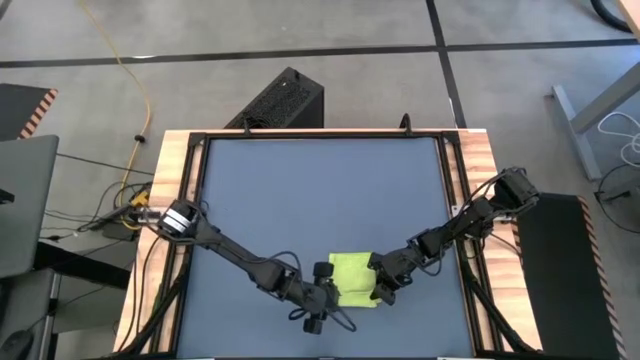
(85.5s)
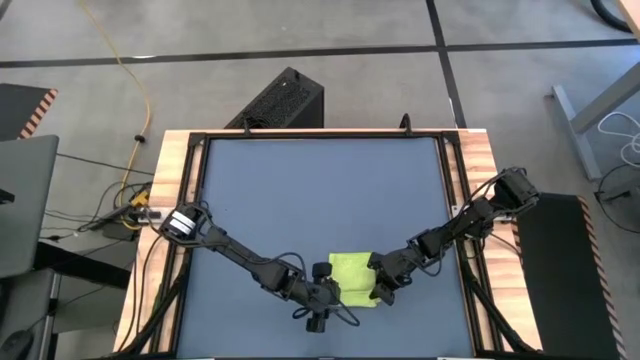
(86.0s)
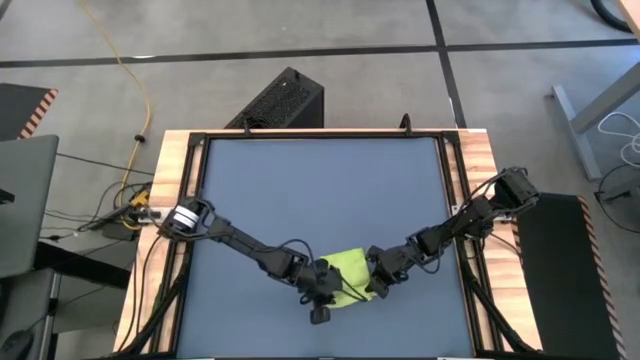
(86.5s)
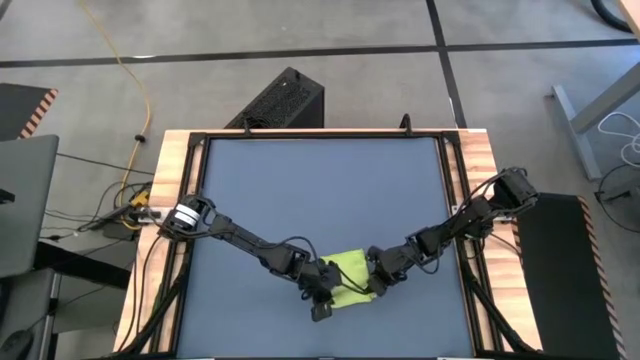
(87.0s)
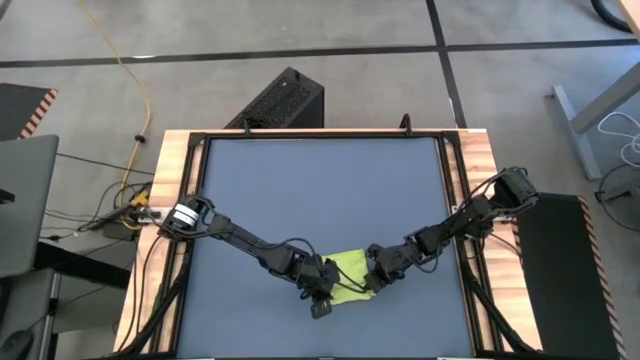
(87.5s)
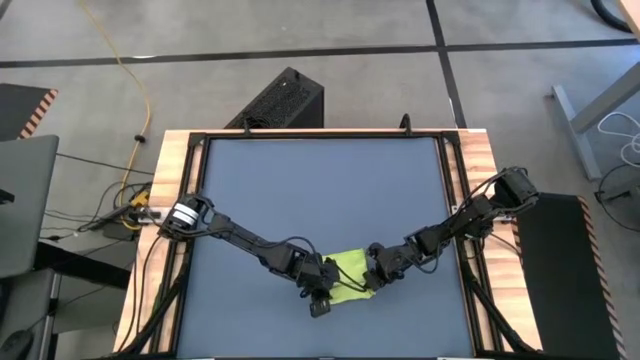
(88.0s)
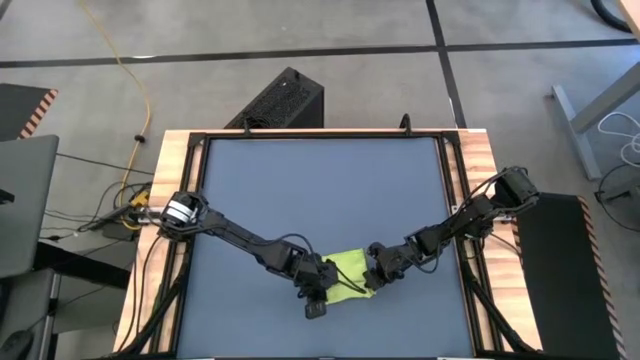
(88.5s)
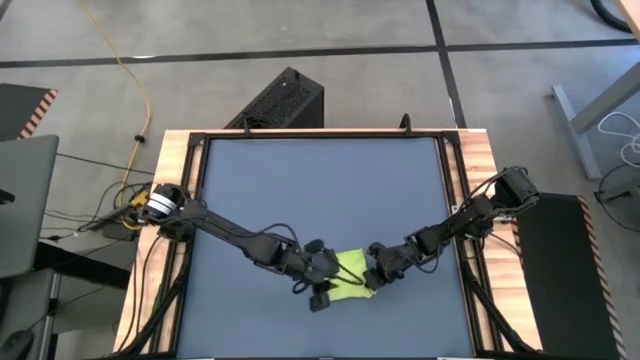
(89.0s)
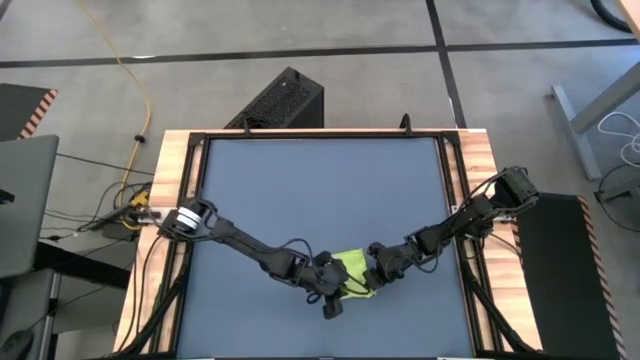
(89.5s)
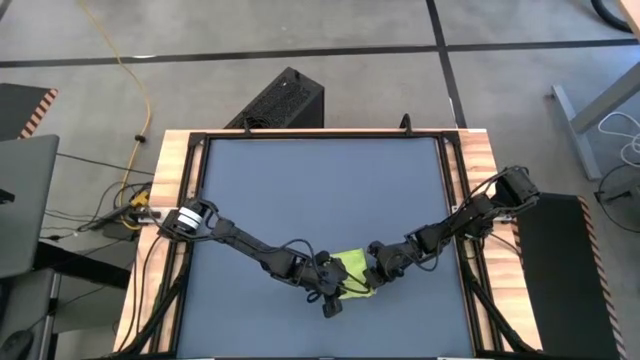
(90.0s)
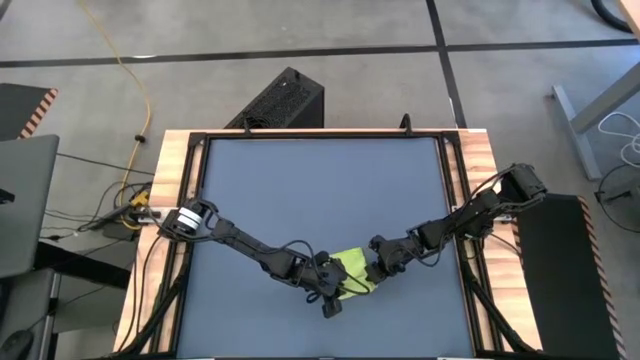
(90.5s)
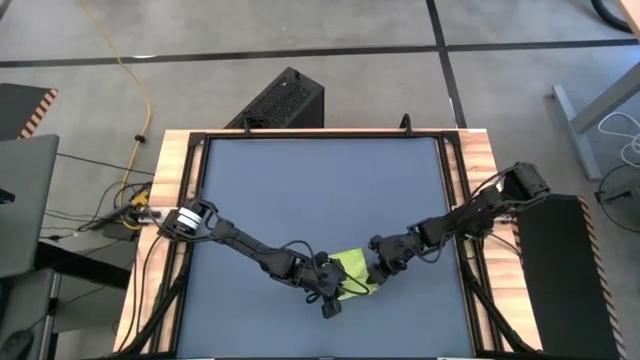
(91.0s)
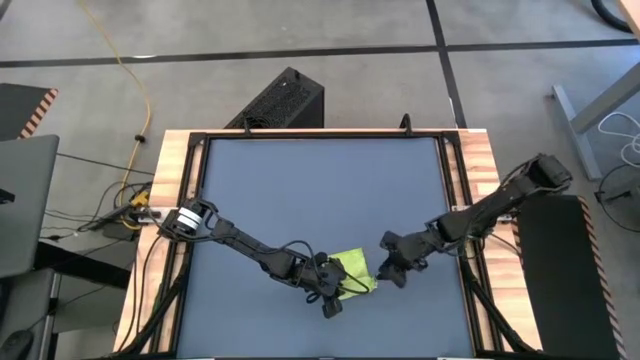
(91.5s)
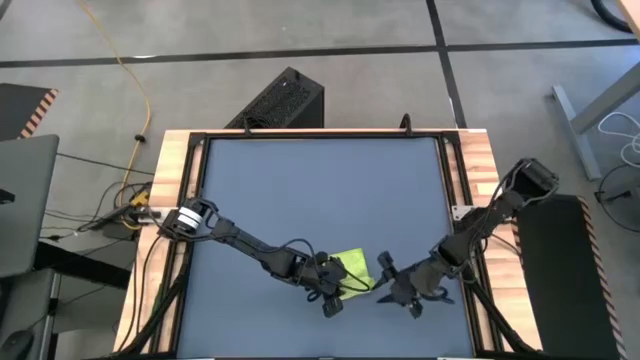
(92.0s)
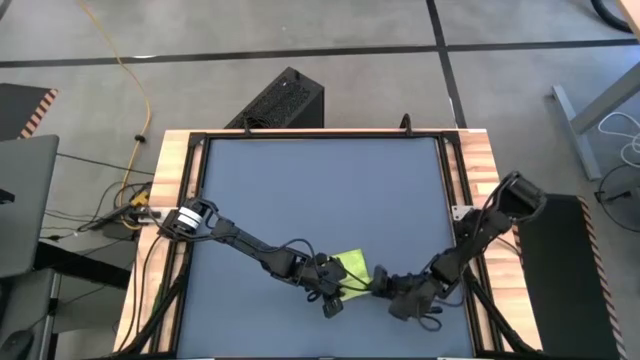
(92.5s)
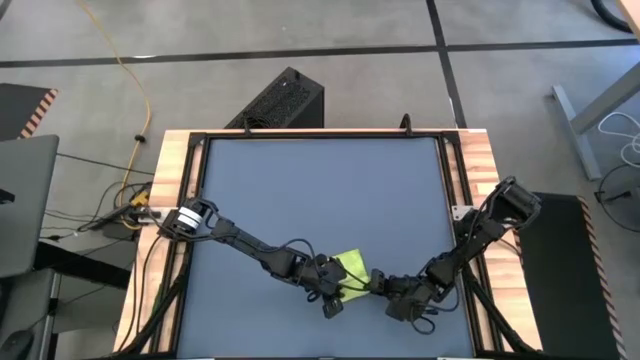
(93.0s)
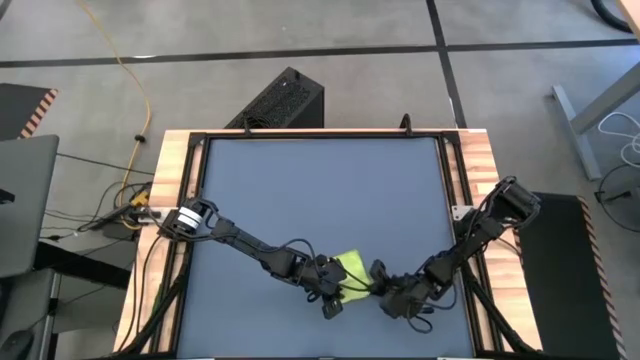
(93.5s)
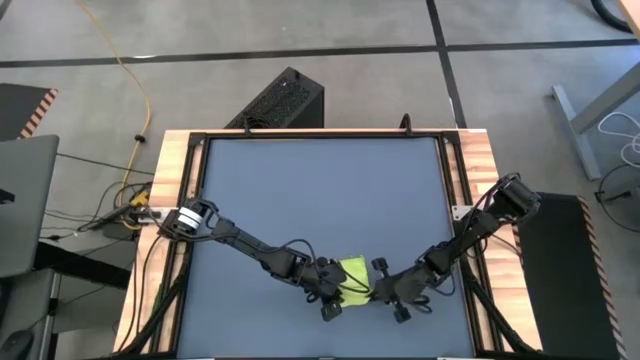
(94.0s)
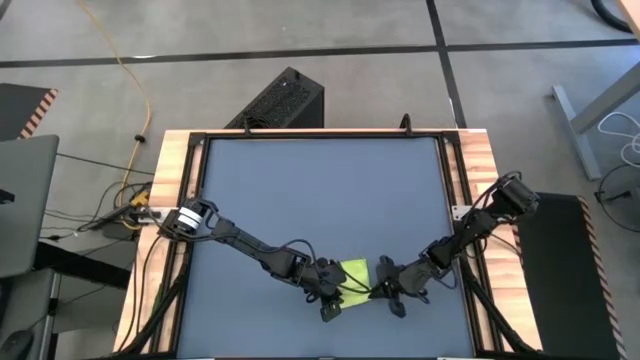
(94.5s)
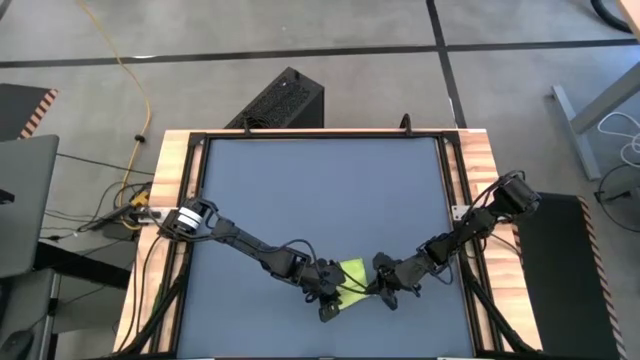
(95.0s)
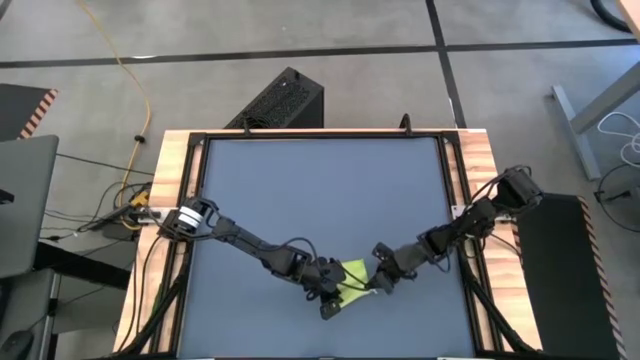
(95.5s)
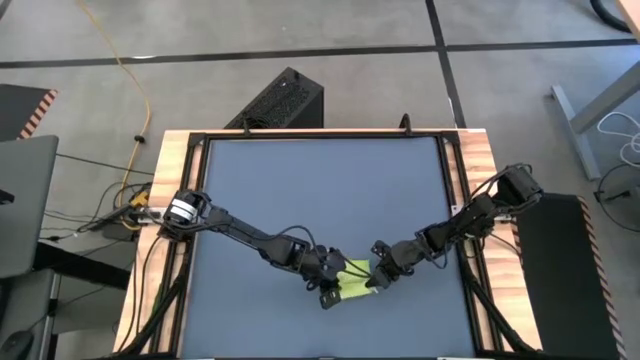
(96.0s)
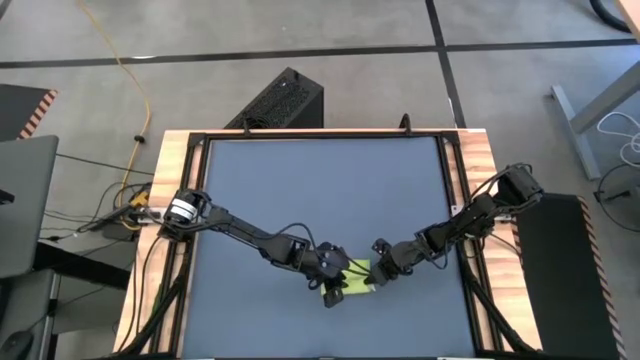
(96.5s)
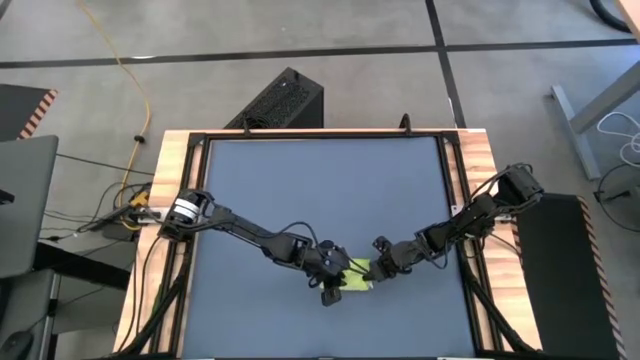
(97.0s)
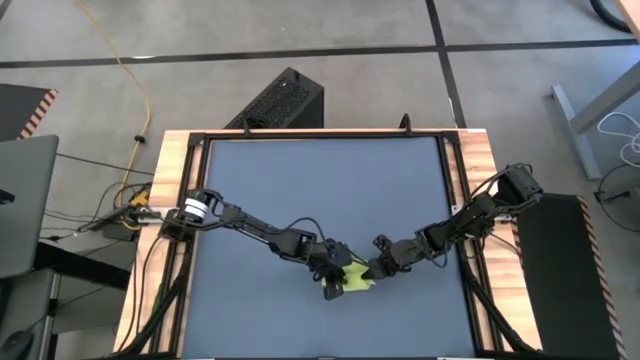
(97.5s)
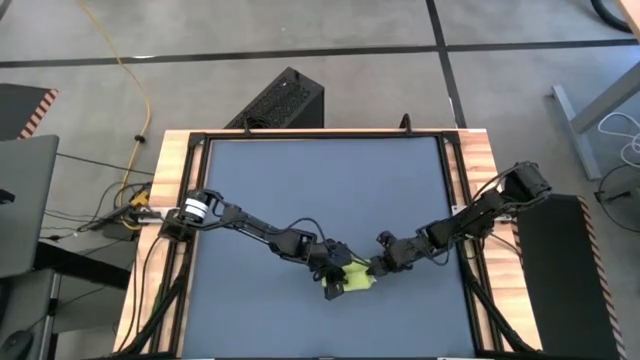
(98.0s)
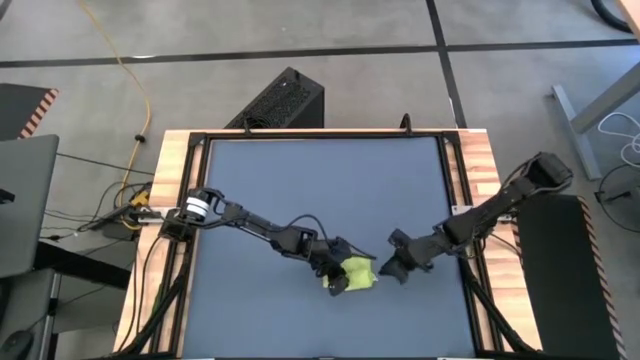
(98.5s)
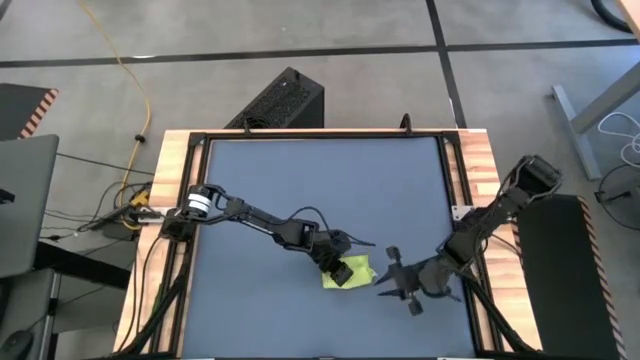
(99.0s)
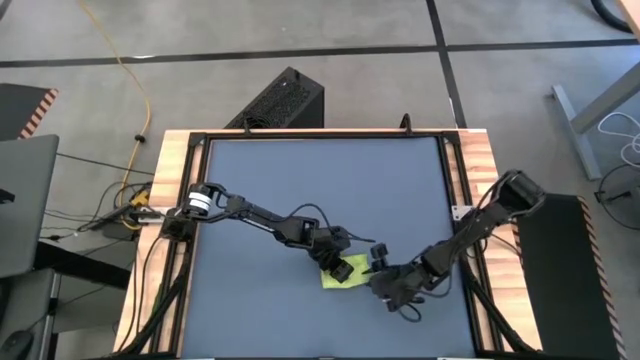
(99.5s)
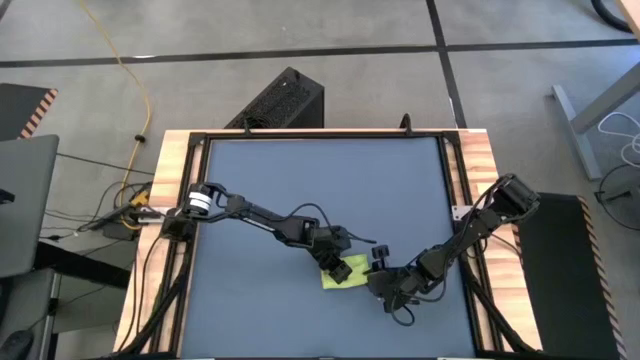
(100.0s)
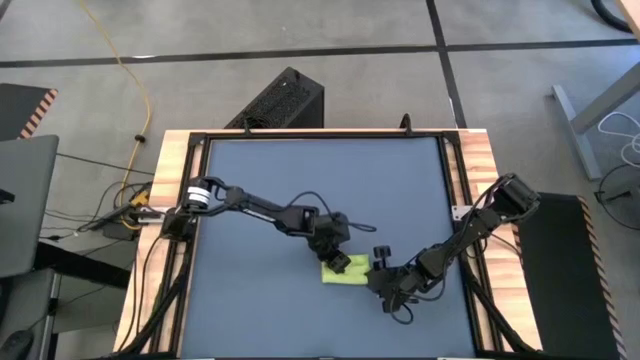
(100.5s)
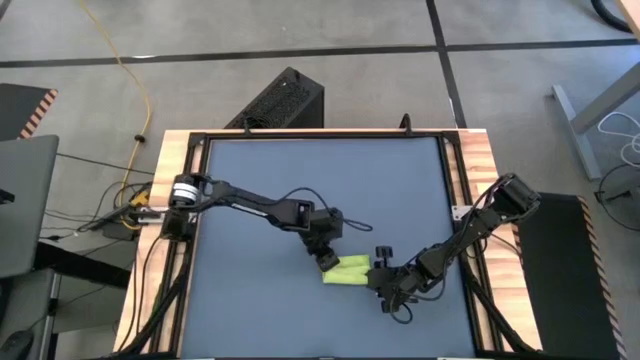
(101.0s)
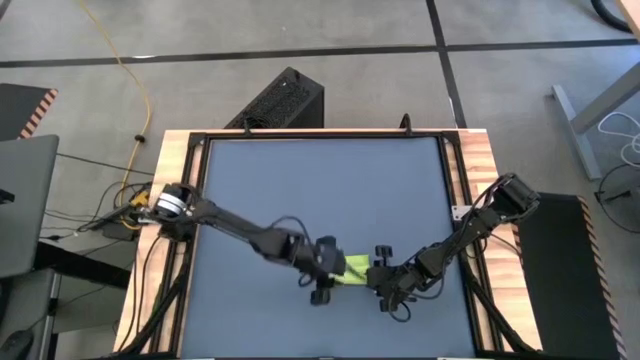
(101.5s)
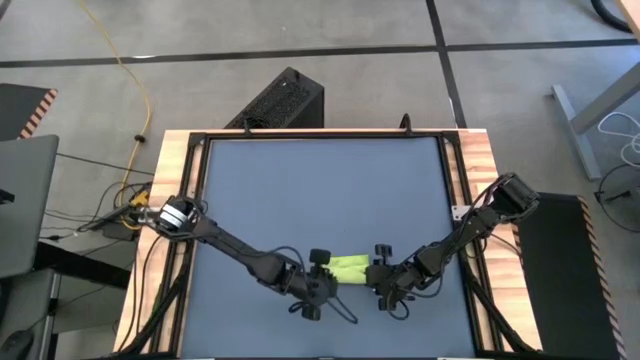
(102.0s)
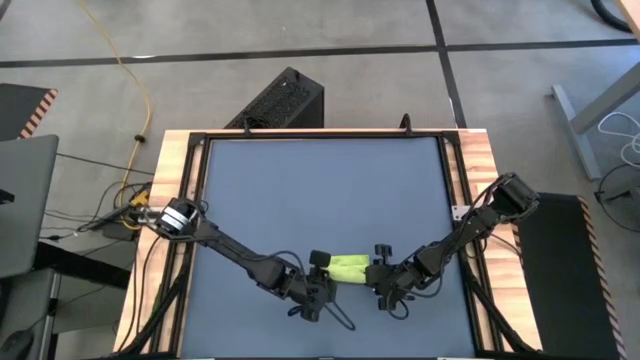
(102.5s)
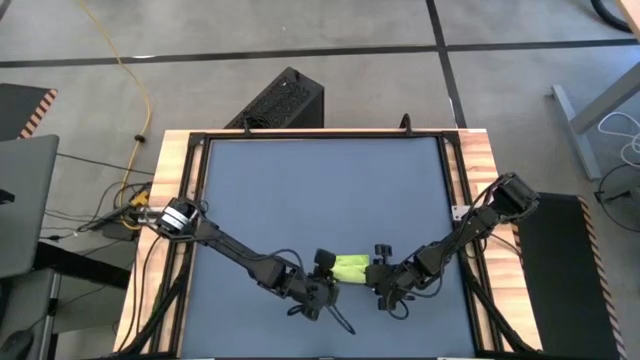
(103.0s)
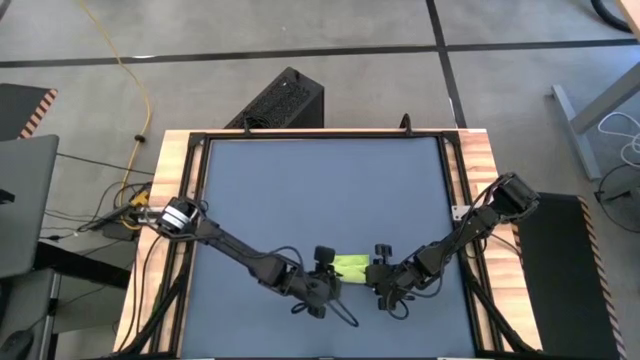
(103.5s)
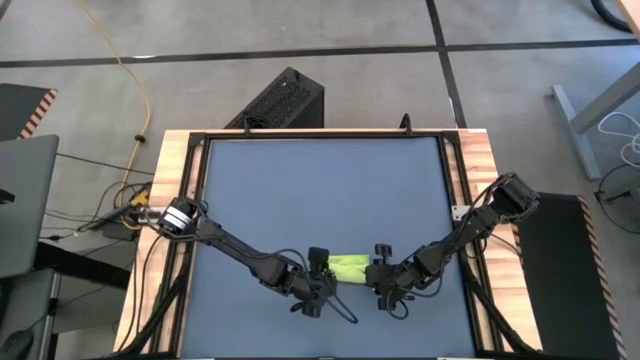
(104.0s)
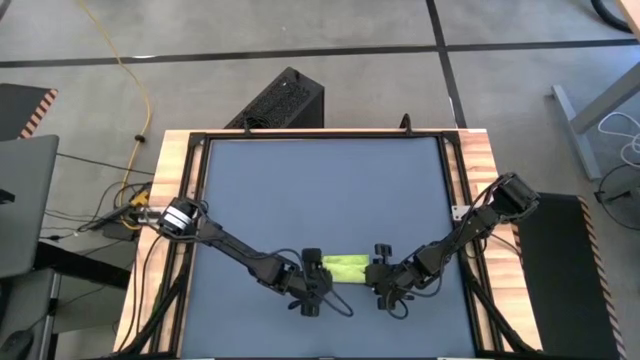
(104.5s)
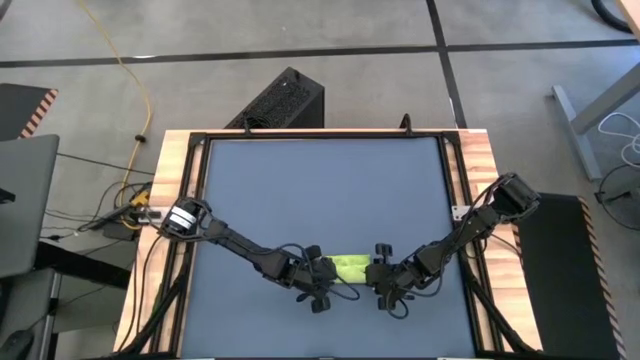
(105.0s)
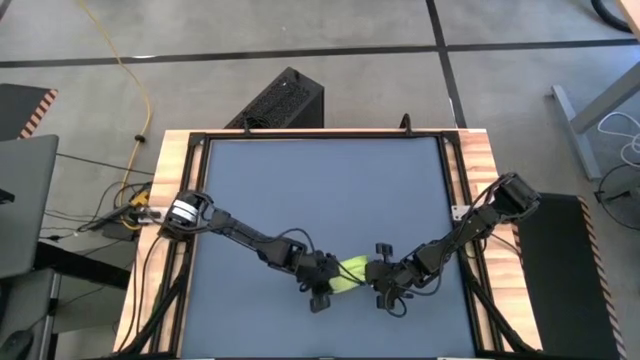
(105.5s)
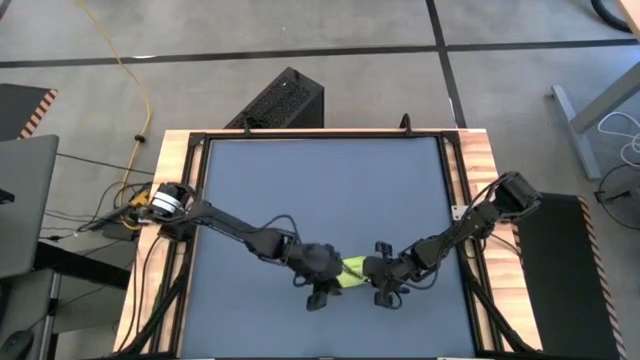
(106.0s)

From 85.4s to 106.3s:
Task: Roll towel into tight, uniform cylinder
Roll the green towel
